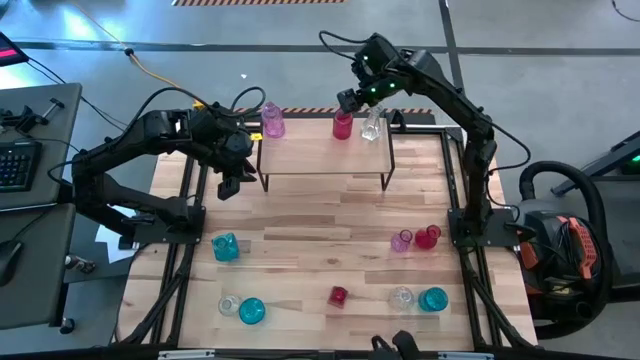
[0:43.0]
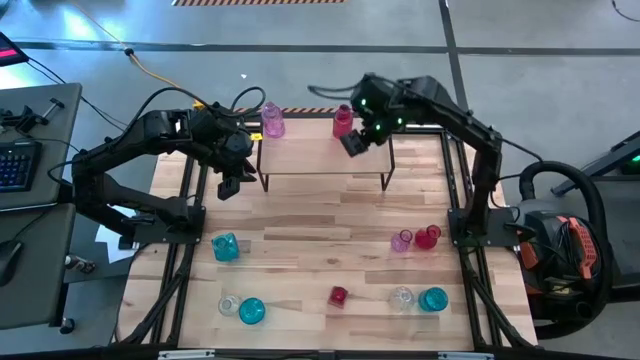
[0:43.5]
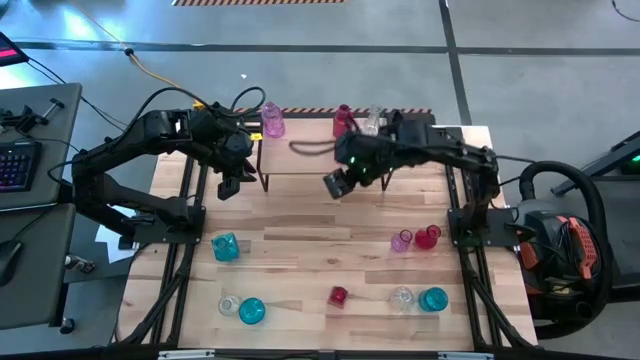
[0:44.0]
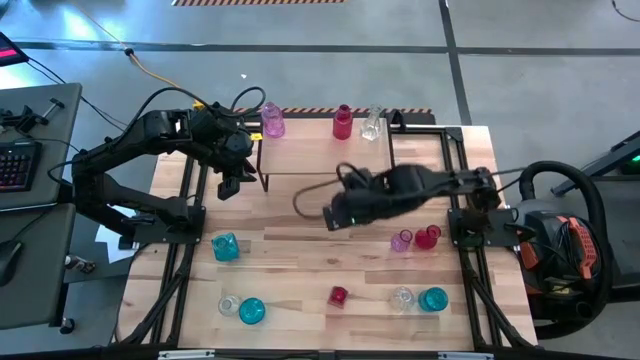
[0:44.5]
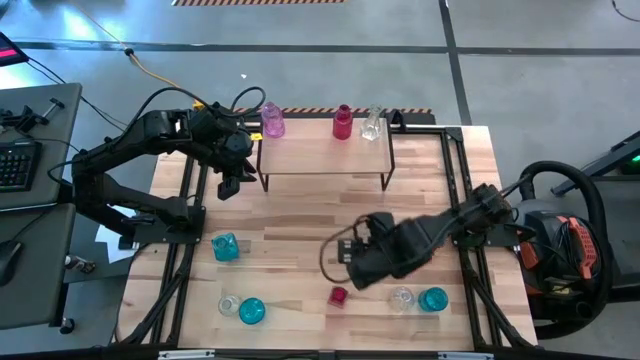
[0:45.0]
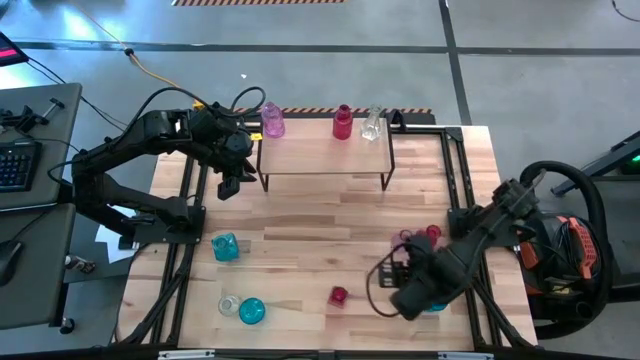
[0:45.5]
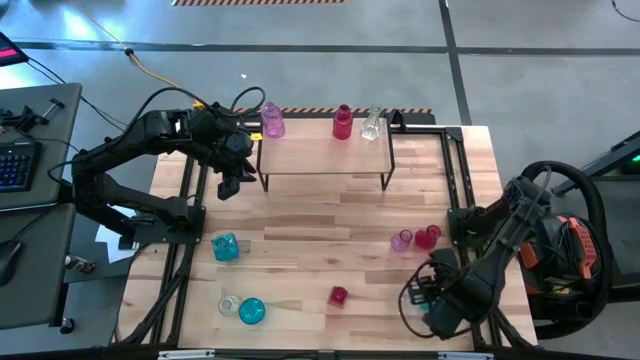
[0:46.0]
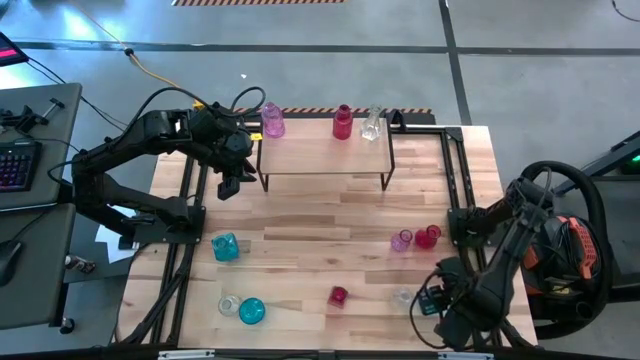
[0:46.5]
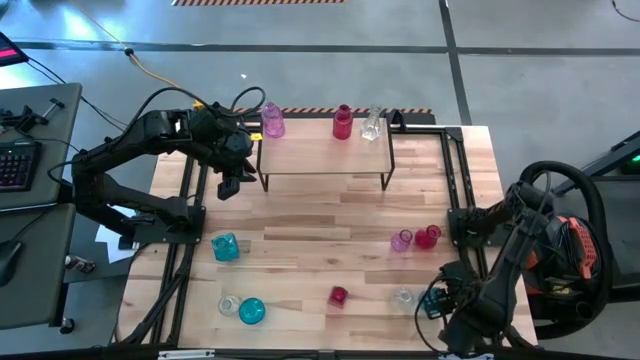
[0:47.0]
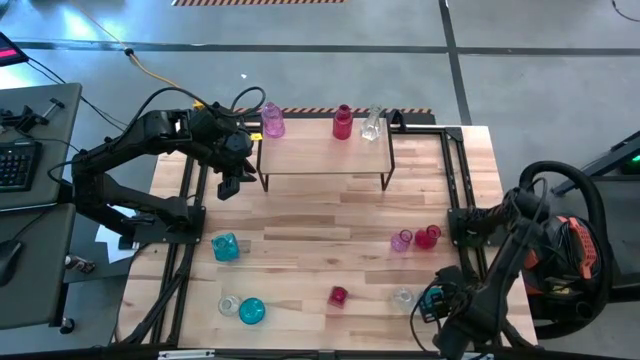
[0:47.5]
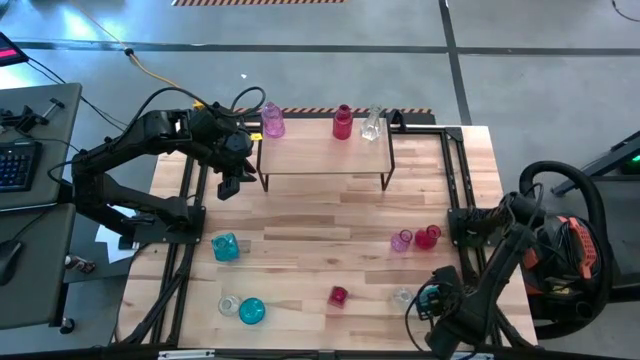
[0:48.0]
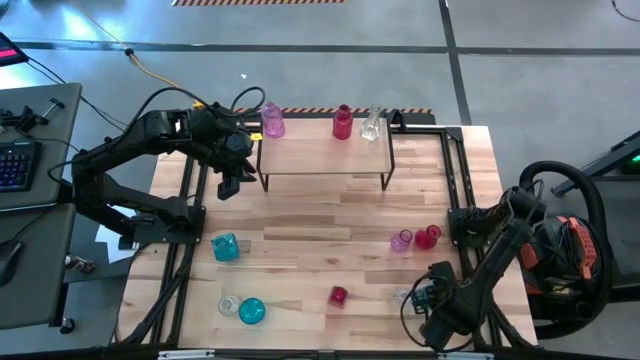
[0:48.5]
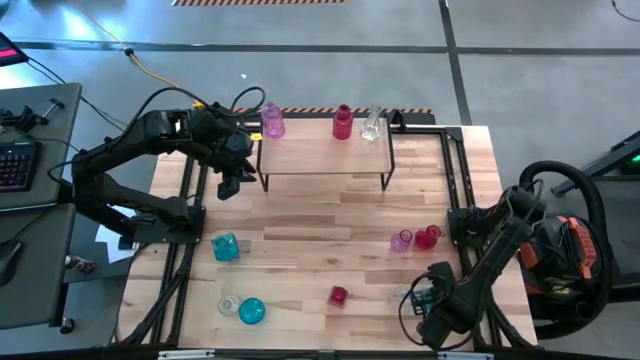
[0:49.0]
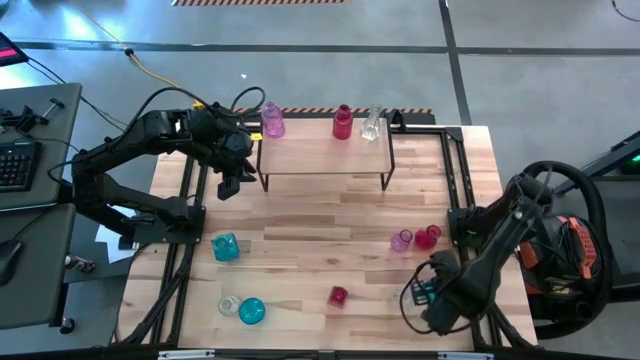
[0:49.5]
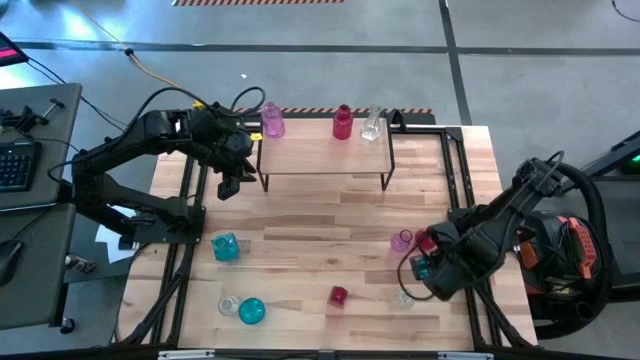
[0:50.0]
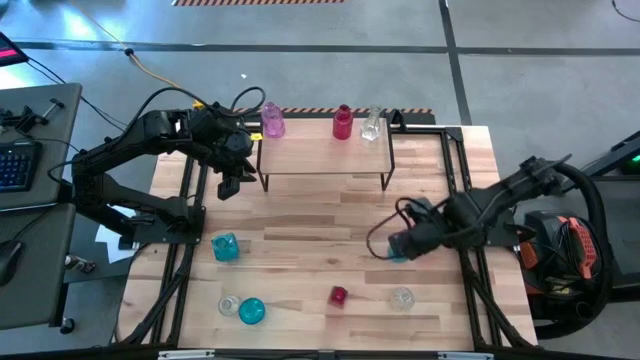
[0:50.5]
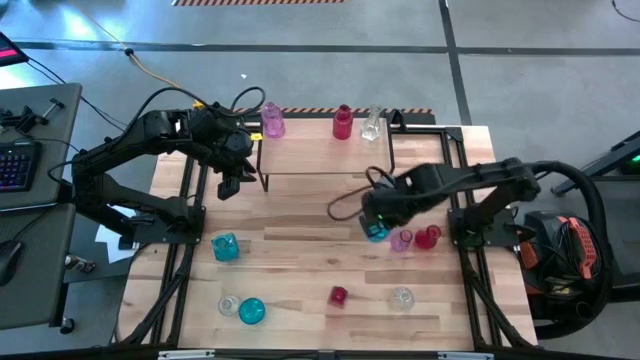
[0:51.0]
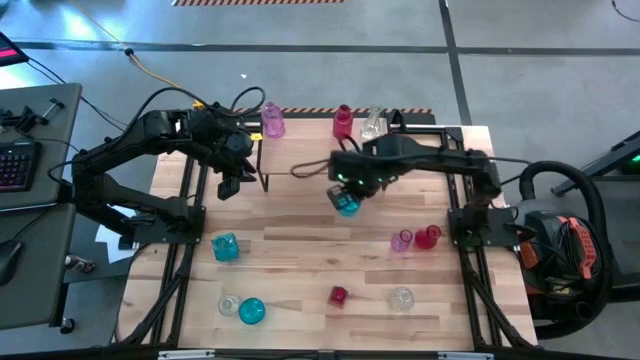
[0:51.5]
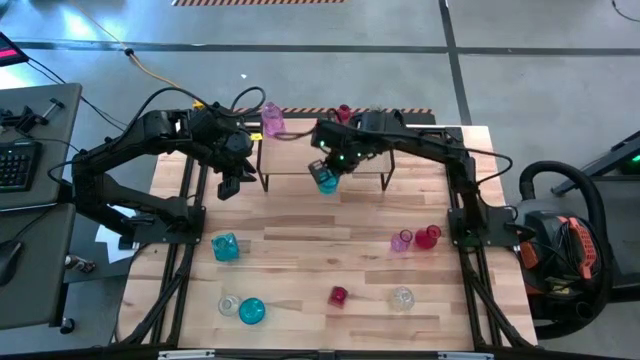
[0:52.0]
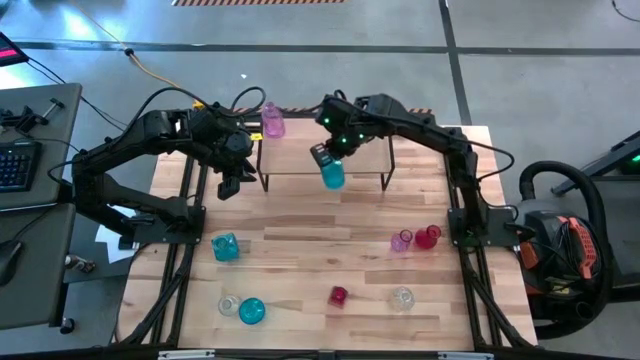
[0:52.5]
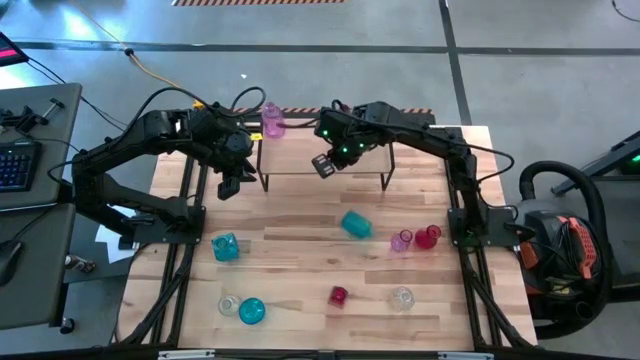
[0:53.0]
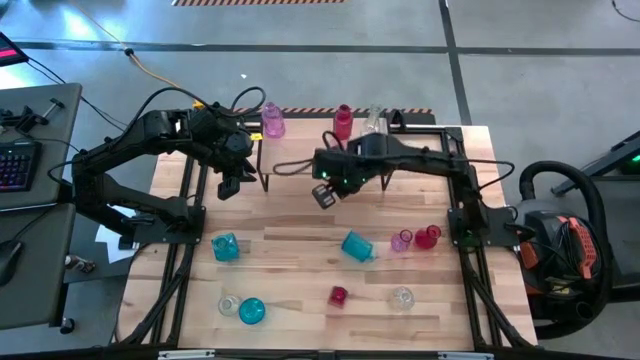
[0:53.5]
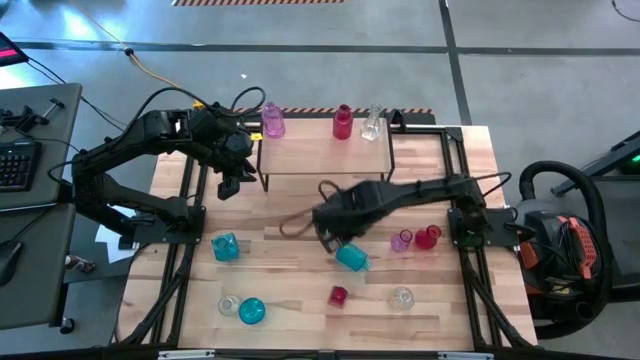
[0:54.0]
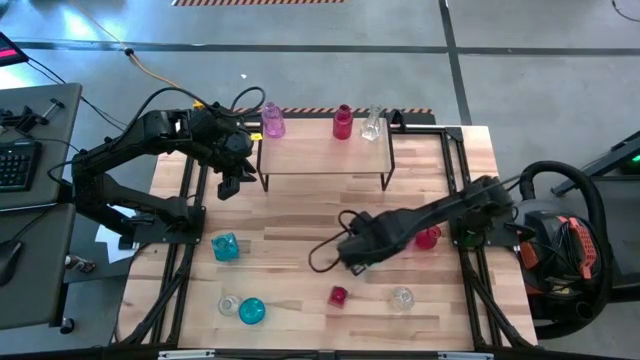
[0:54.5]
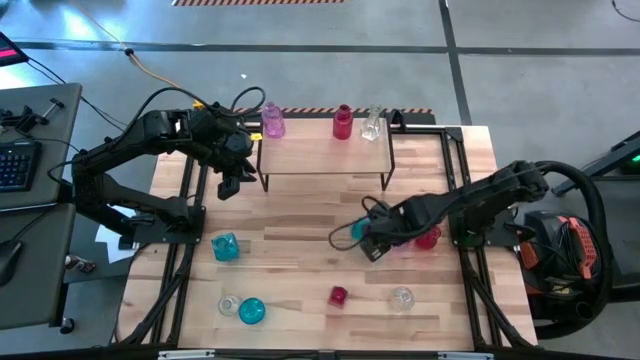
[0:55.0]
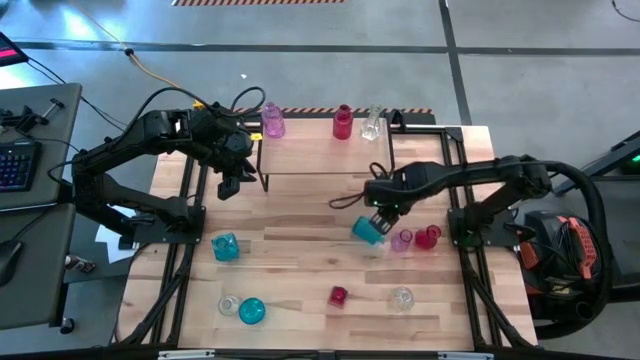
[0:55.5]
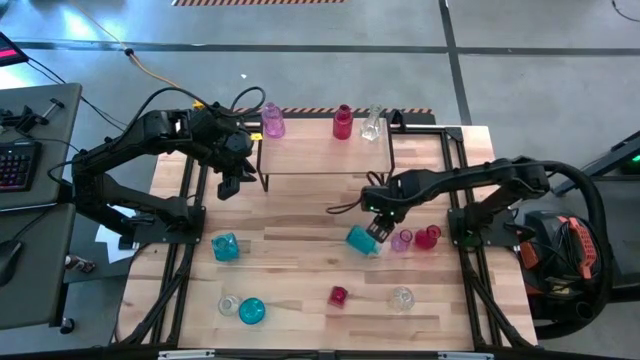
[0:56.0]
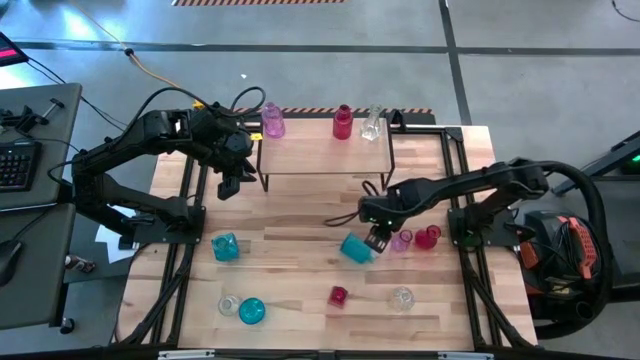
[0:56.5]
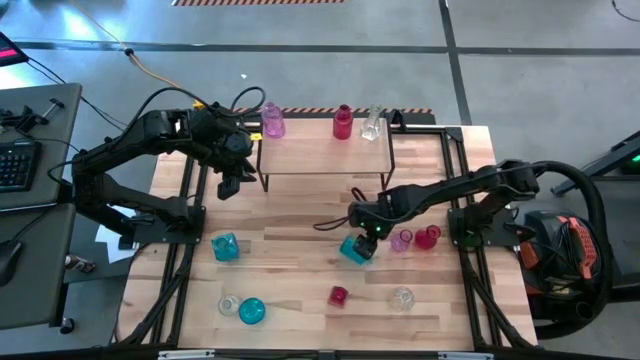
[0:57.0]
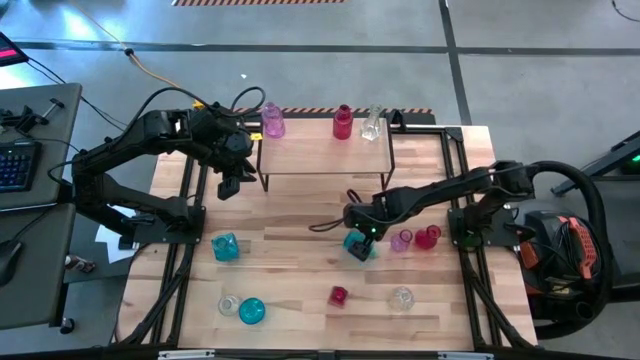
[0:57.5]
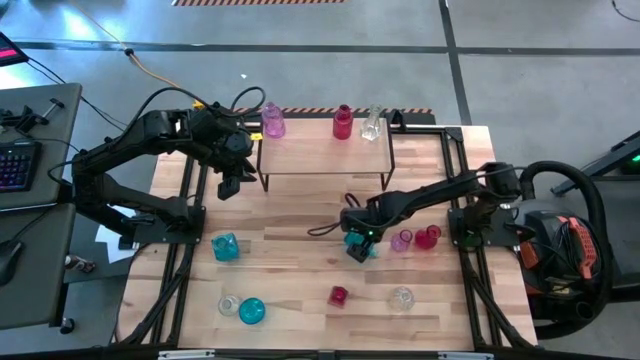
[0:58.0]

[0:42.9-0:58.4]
Task: sort vases onto shelf
Put the bottom right blue vase on the shelf

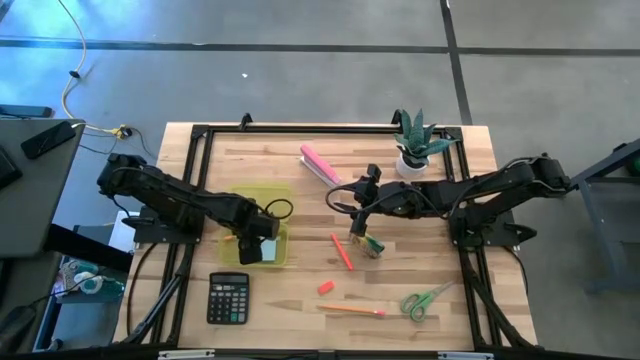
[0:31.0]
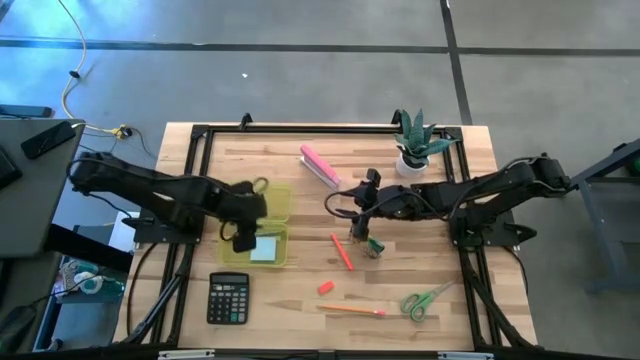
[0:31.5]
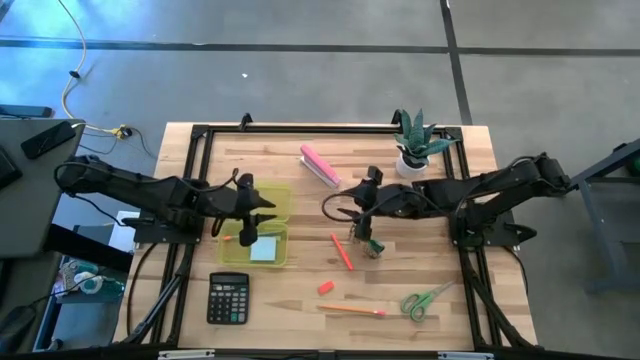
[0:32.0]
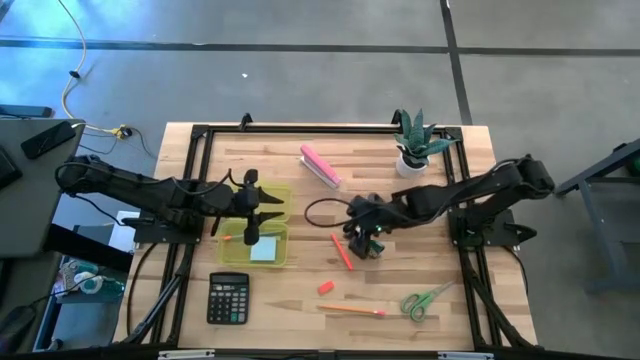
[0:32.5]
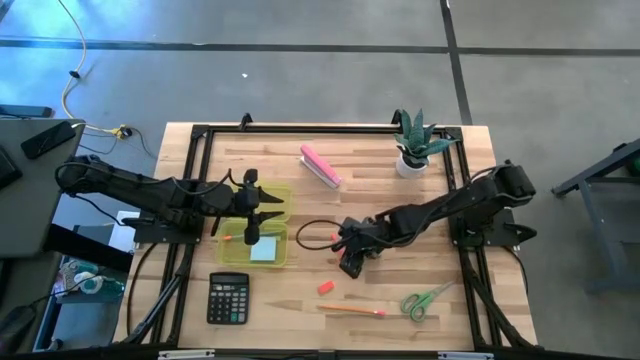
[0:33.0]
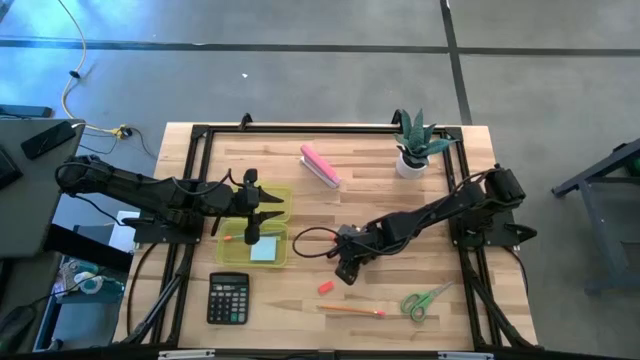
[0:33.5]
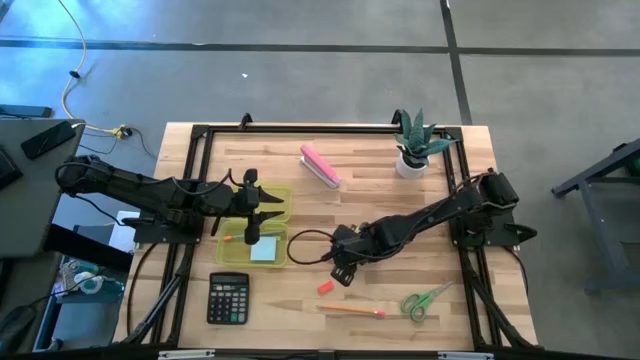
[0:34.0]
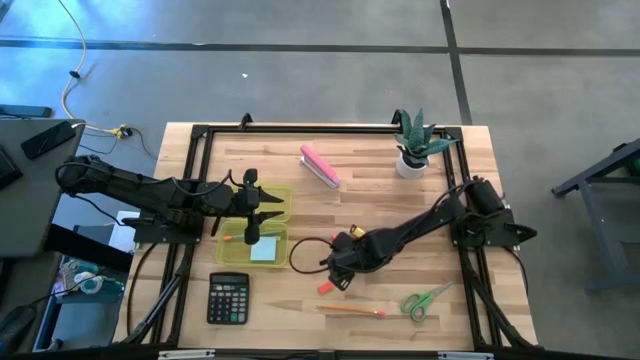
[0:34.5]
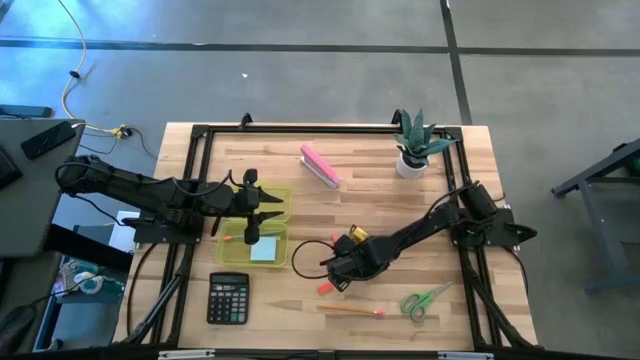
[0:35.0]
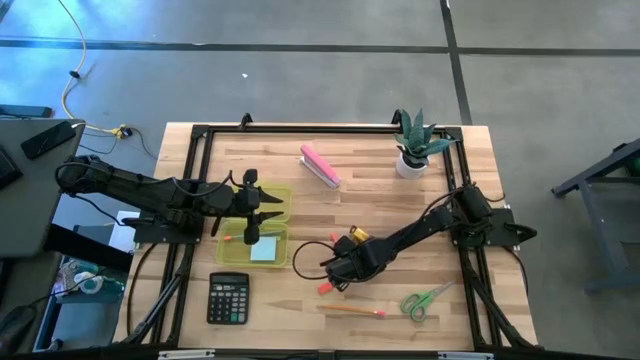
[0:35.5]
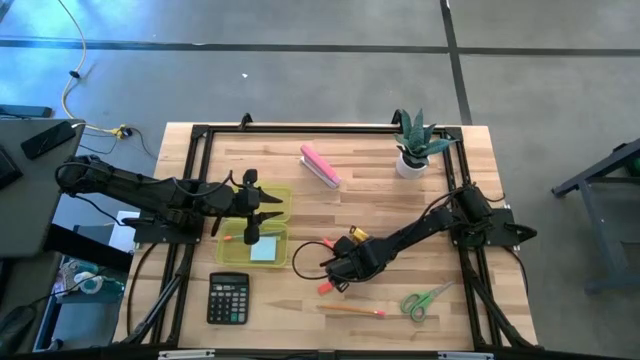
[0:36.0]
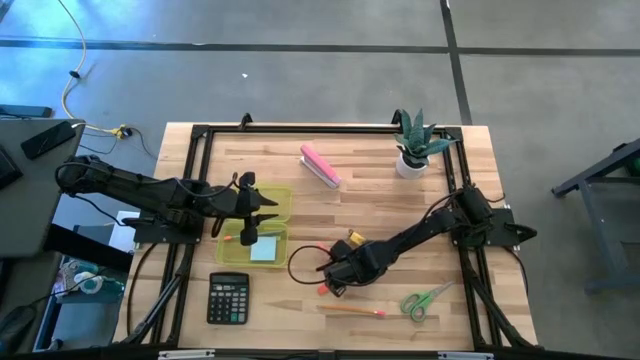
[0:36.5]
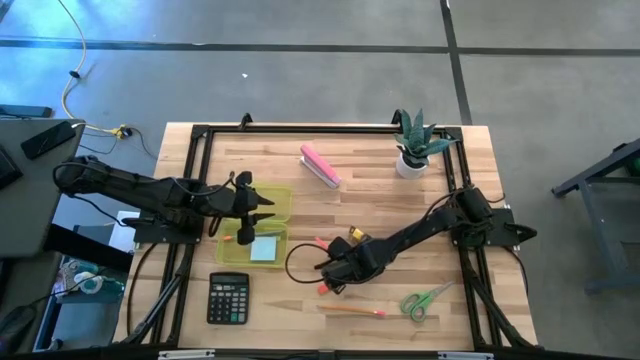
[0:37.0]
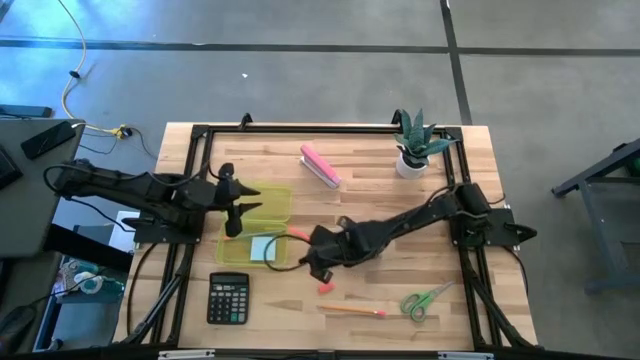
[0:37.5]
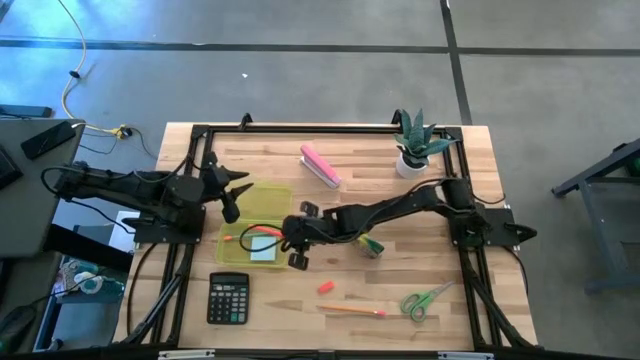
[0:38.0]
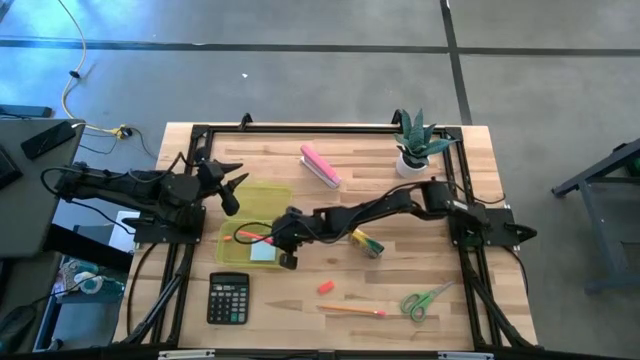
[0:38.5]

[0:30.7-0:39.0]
Task: Pack school essentials
Put the orange pen into the yellow supply box
